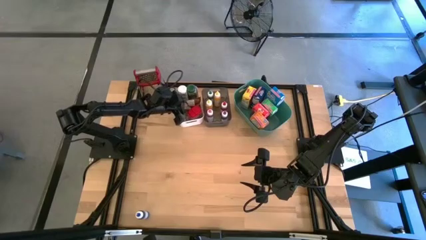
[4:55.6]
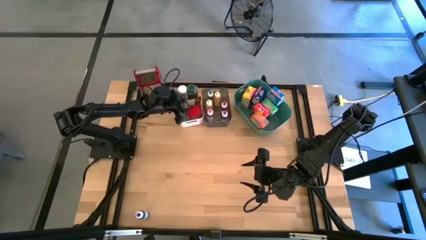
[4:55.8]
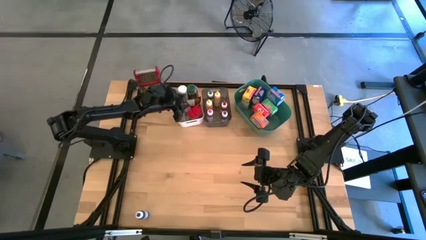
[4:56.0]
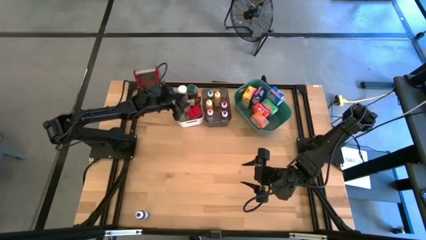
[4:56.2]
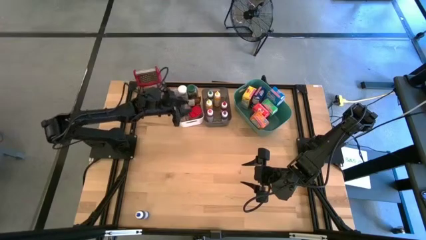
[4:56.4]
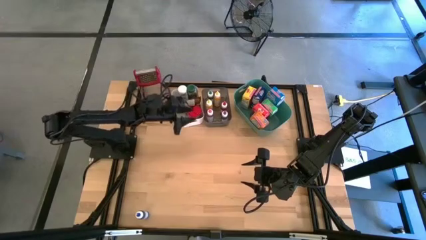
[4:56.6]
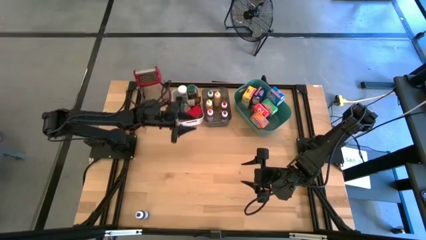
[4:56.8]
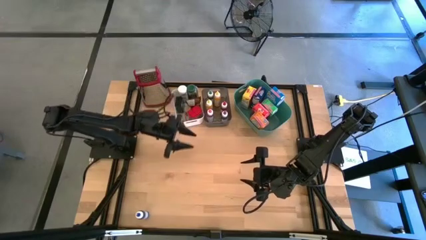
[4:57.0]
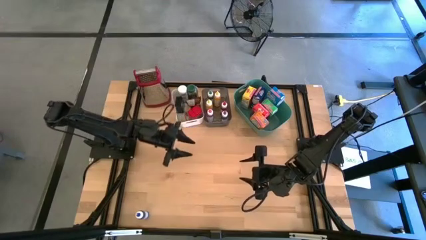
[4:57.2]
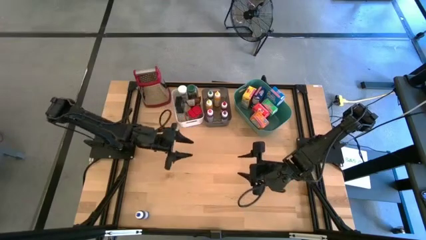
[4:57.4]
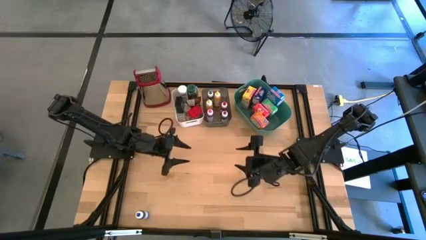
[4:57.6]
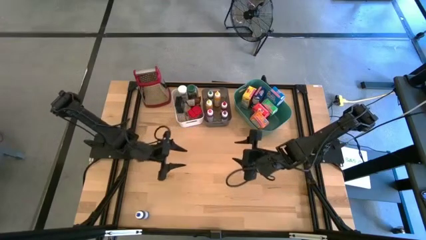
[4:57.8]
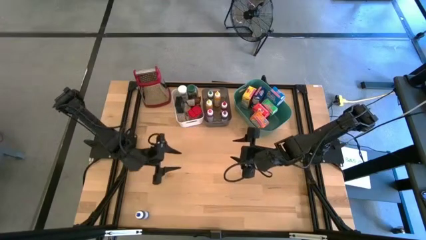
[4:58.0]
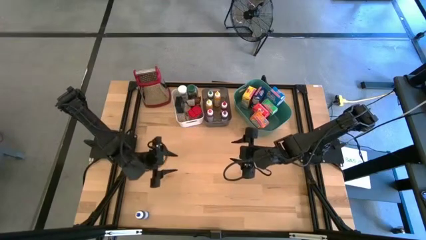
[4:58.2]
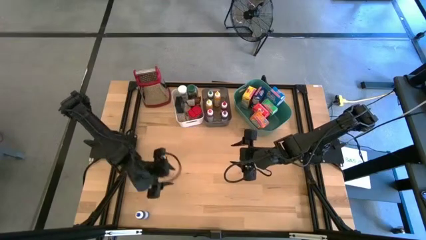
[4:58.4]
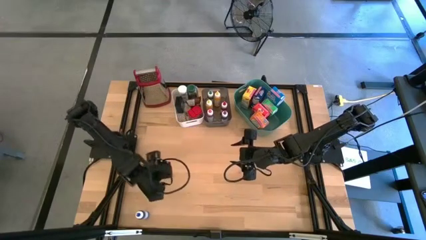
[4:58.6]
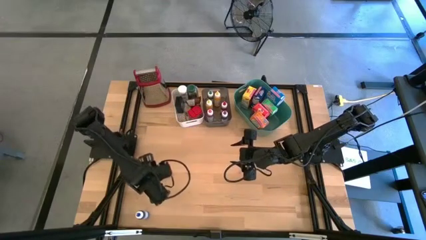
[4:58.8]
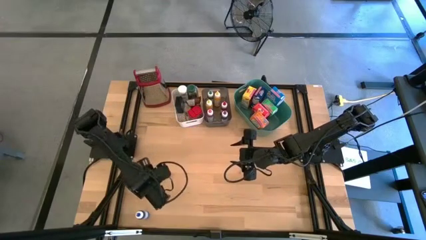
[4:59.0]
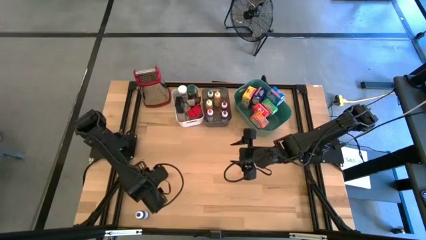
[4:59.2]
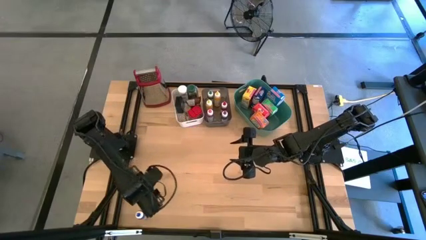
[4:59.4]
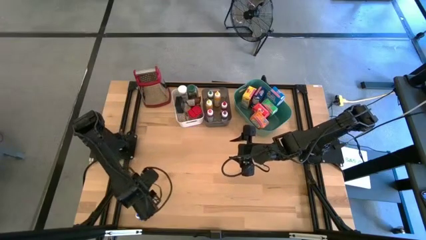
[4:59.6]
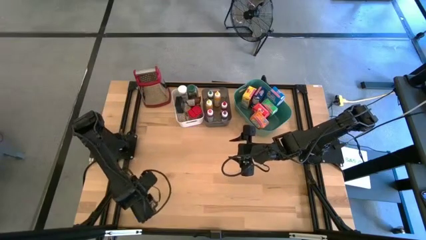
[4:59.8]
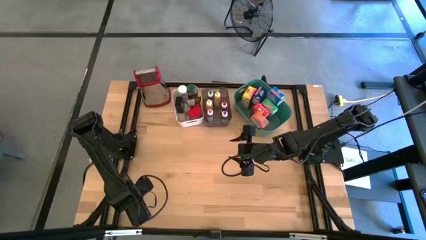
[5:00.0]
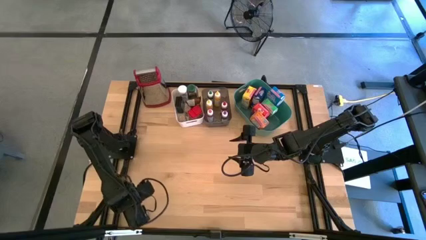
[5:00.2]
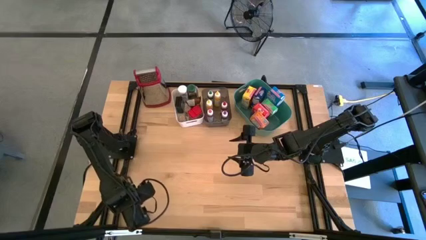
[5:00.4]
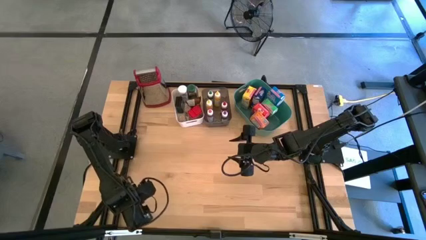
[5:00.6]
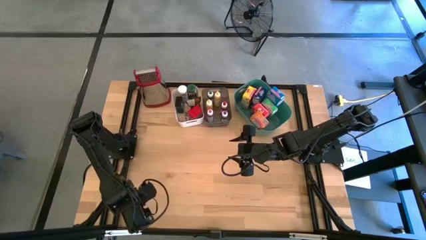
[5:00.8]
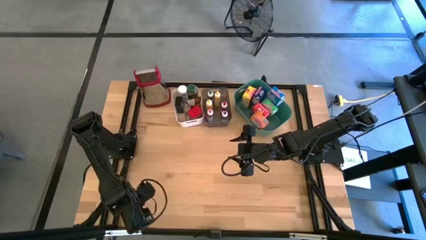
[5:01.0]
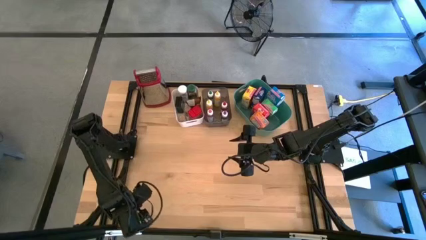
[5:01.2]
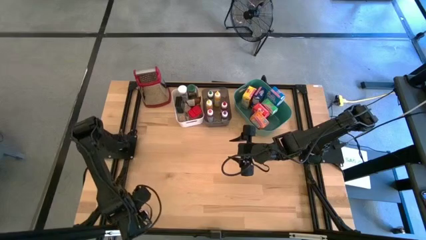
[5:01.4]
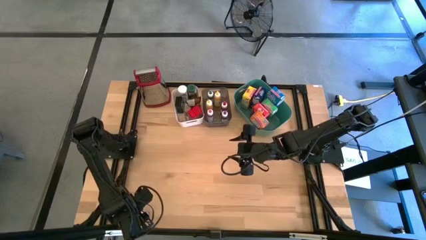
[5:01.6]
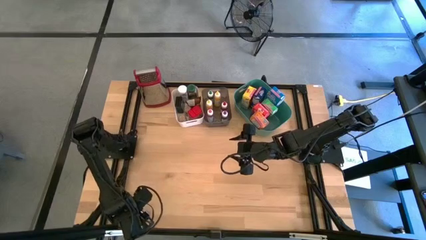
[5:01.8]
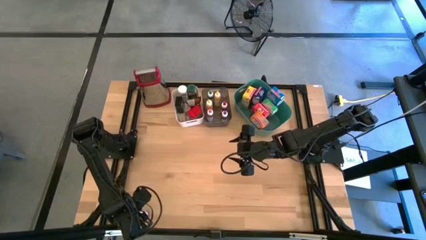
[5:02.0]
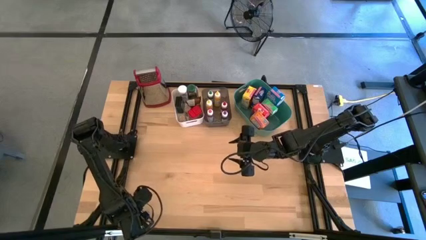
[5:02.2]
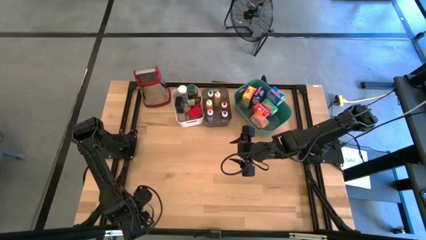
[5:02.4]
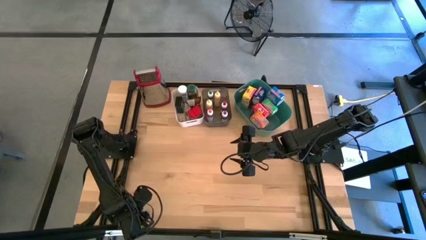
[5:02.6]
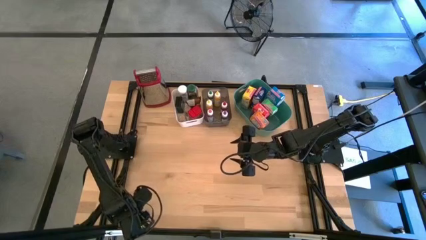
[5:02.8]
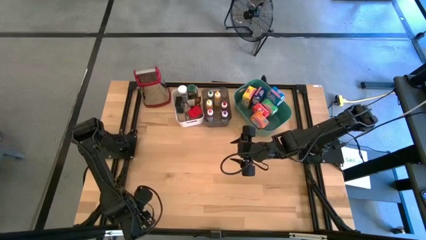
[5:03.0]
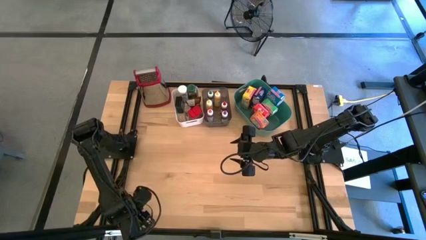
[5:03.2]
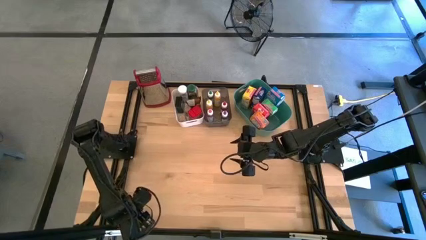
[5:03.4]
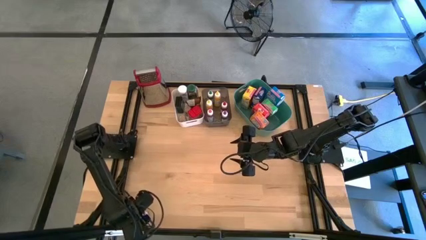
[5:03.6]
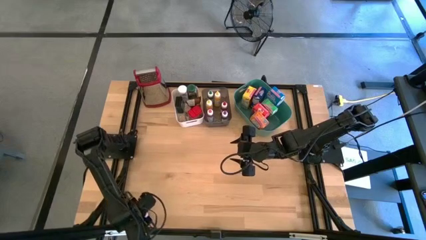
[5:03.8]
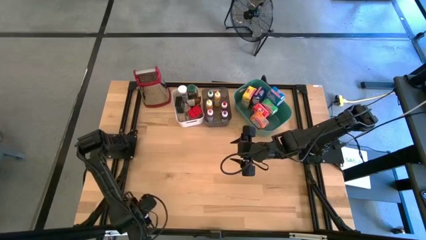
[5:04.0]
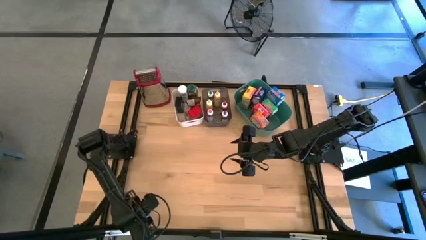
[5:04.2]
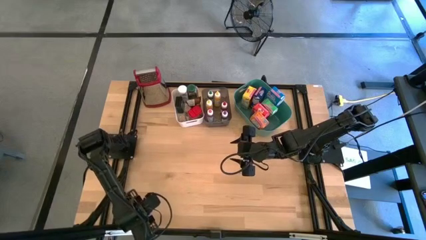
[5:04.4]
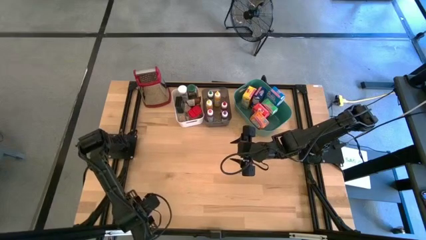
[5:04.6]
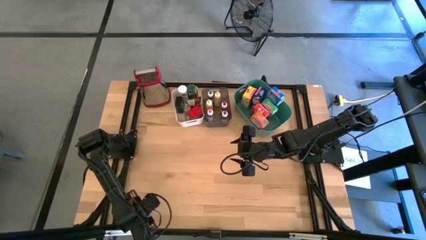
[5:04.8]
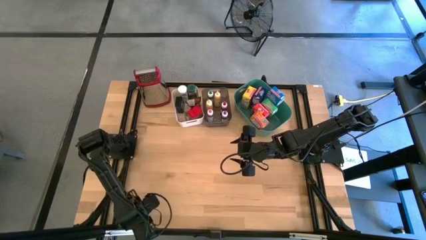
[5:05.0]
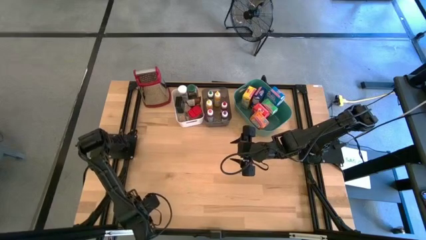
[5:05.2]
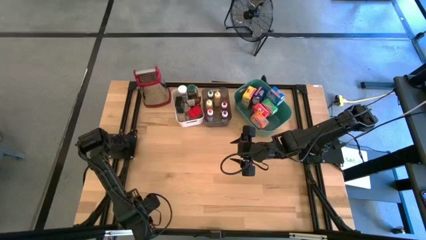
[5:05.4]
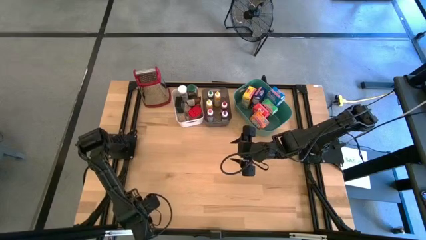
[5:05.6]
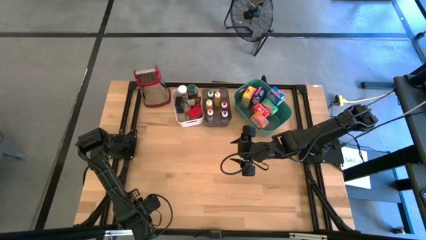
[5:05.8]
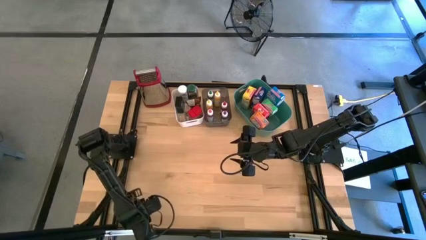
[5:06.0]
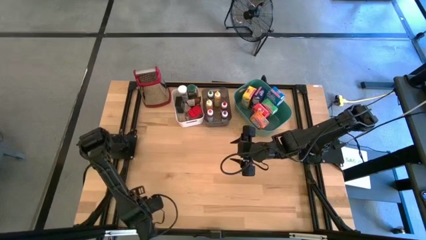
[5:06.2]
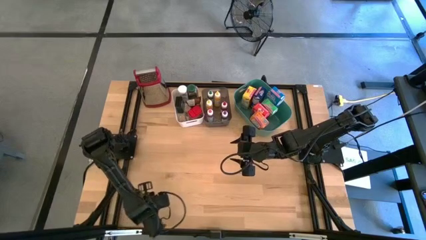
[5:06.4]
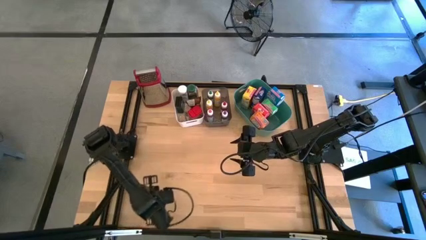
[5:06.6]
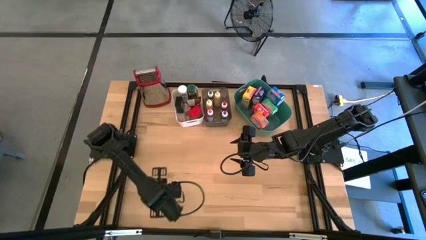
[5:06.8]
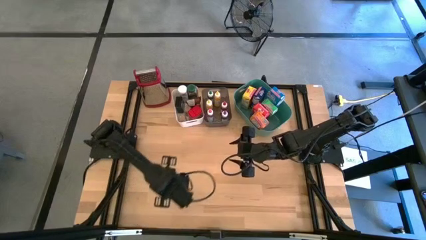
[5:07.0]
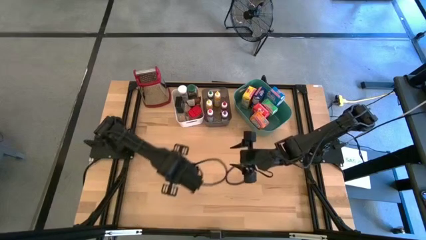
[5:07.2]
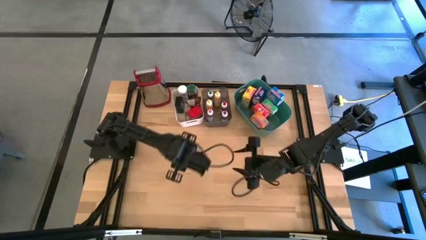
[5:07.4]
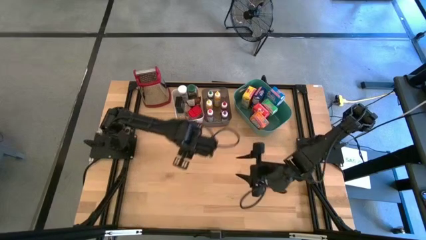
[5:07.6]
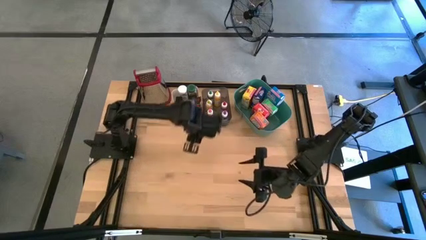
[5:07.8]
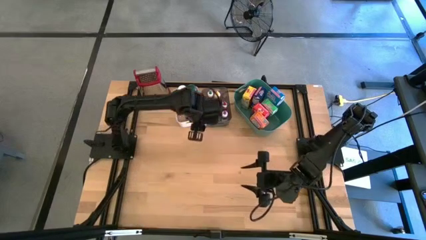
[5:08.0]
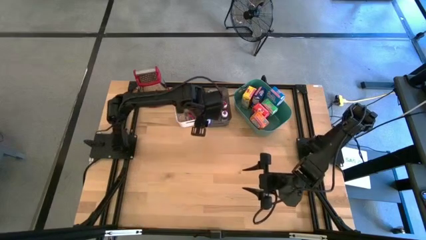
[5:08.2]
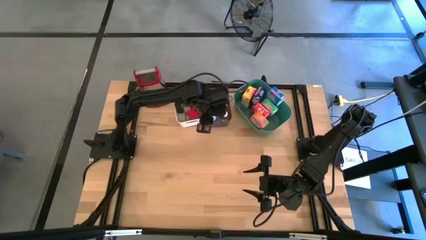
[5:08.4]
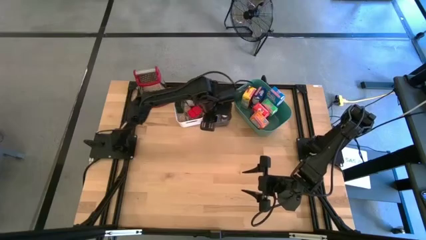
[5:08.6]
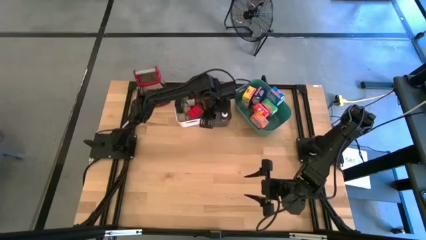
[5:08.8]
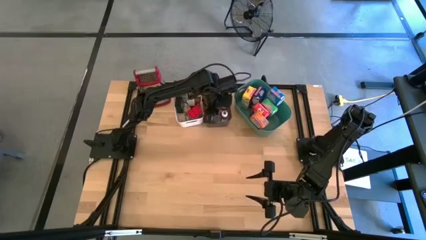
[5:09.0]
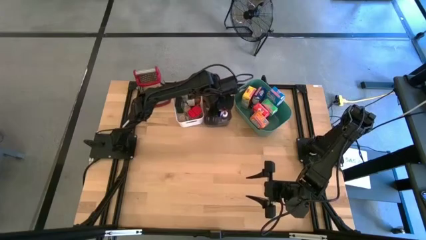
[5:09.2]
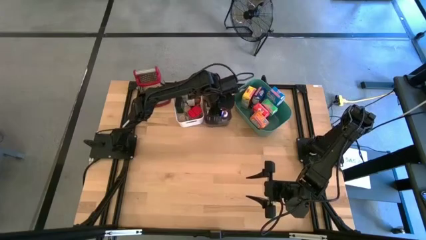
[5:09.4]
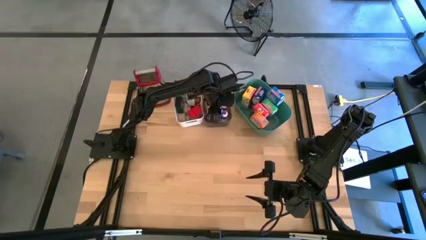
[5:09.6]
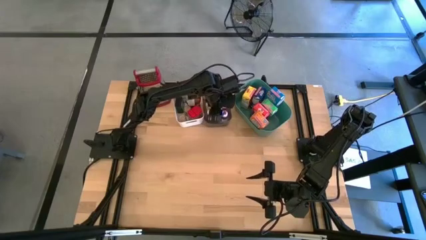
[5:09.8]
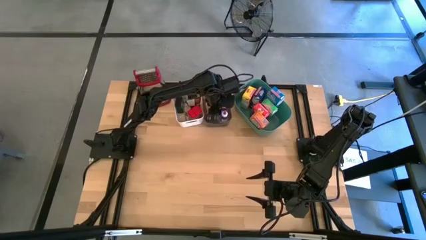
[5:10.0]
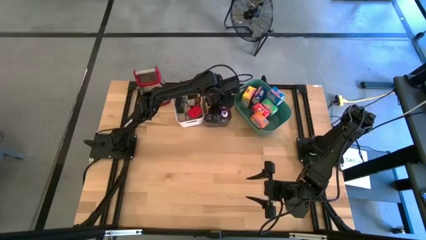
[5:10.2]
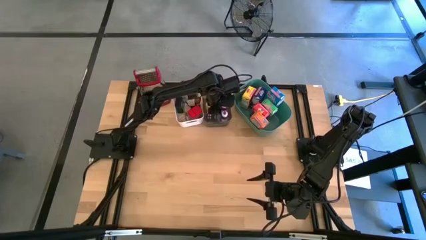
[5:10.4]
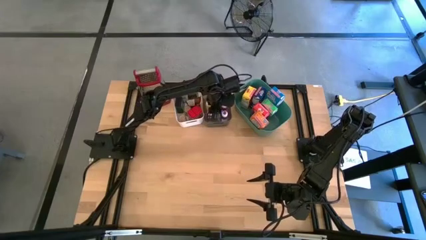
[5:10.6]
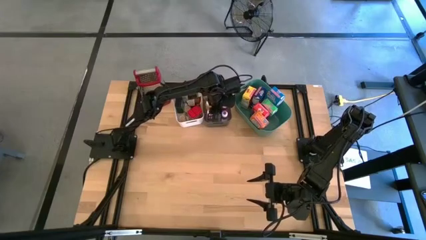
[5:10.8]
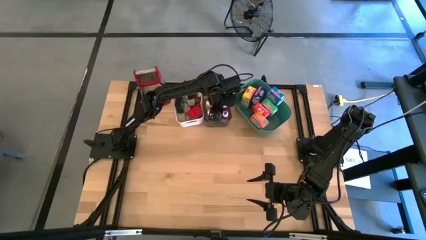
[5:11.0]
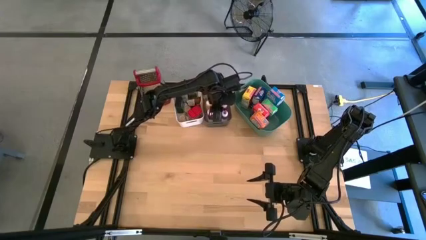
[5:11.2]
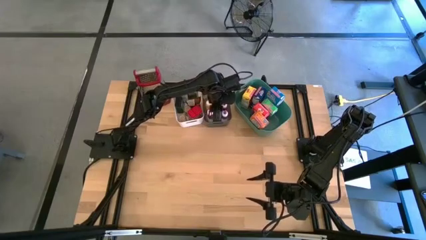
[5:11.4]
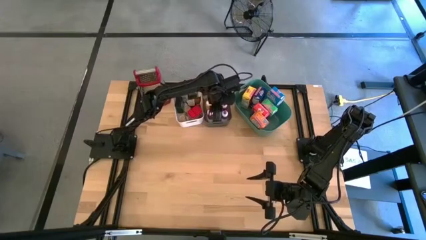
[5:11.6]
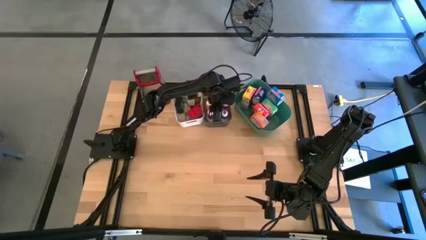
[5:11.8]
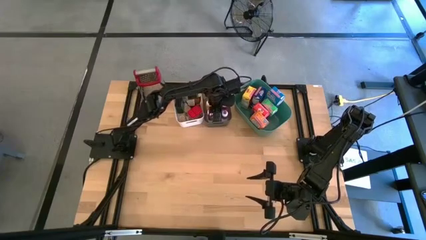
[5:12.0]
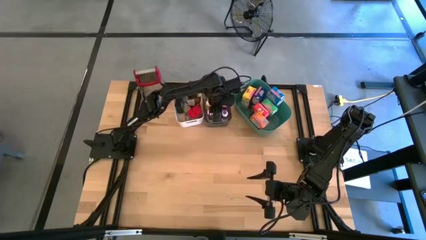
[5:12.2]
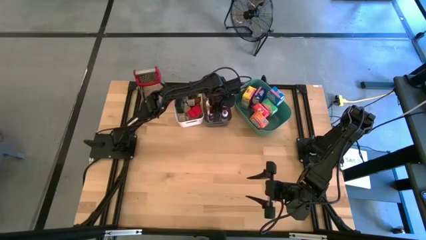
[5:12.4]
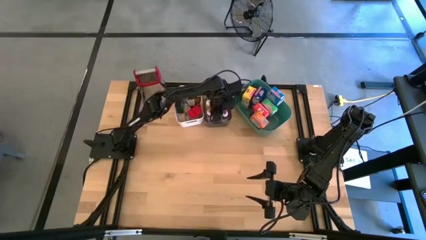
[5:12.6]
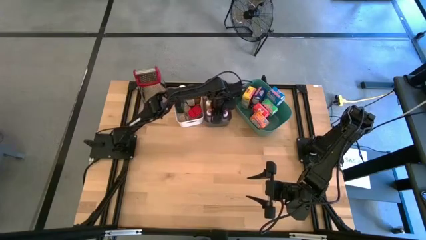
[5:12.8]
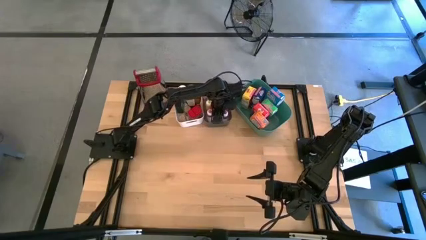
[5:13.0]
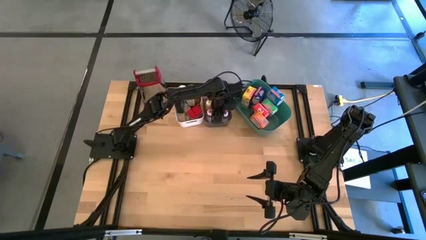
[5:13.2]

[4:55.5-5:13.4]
Task: Pick & Place Kitchen Items
Put the blue food coloring bottle into the middle black transparent bin
